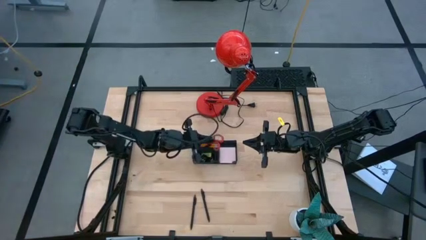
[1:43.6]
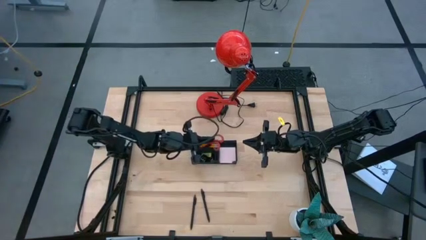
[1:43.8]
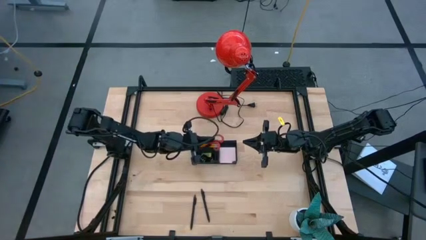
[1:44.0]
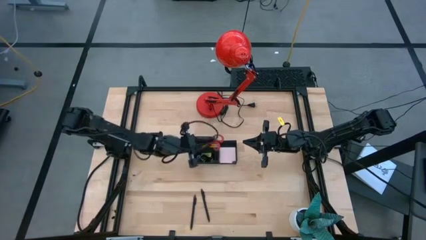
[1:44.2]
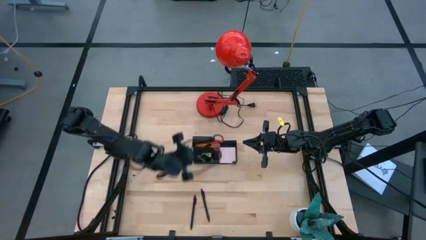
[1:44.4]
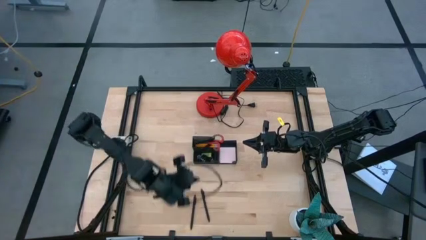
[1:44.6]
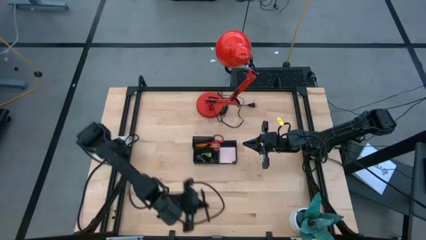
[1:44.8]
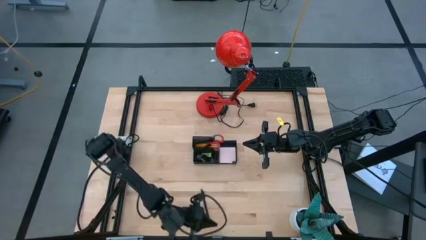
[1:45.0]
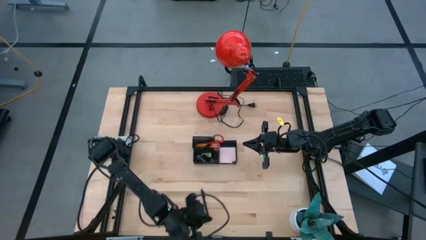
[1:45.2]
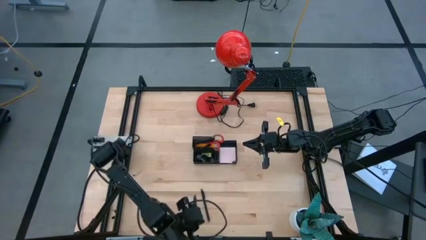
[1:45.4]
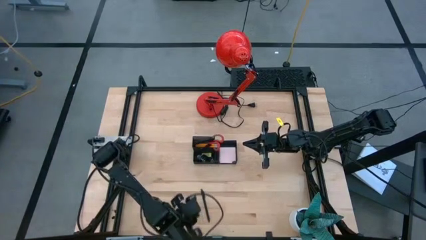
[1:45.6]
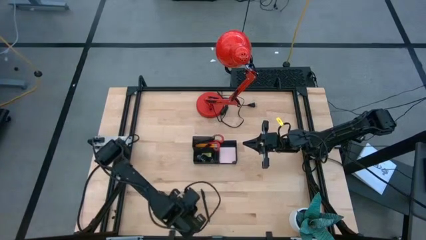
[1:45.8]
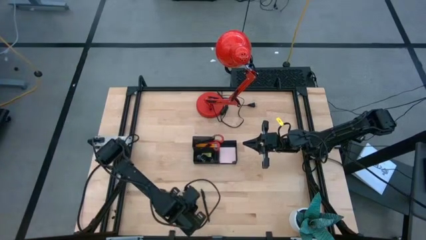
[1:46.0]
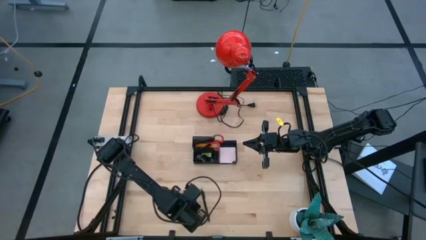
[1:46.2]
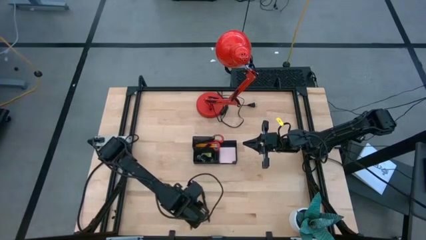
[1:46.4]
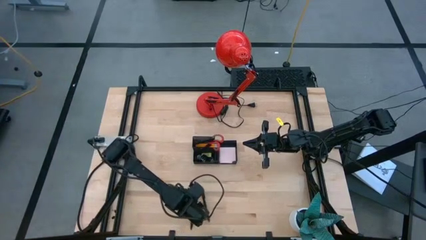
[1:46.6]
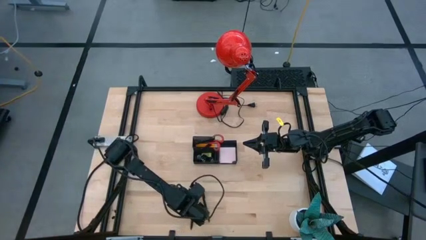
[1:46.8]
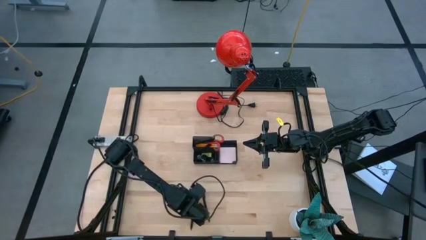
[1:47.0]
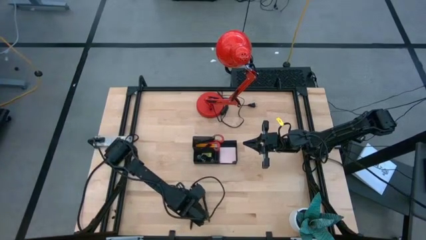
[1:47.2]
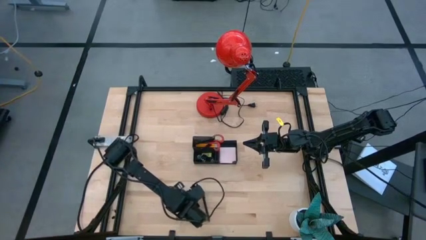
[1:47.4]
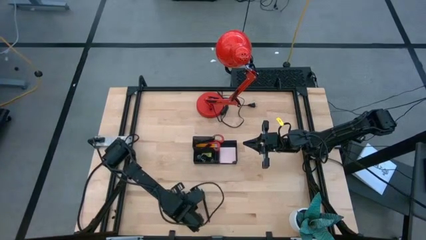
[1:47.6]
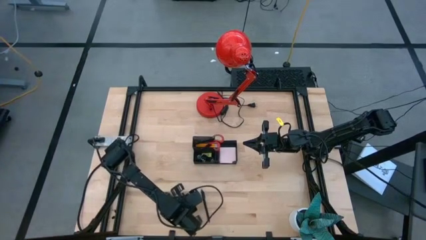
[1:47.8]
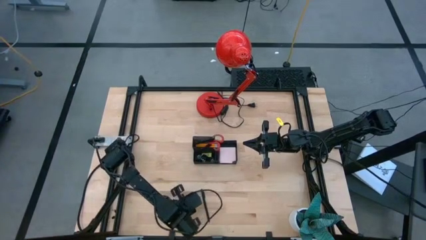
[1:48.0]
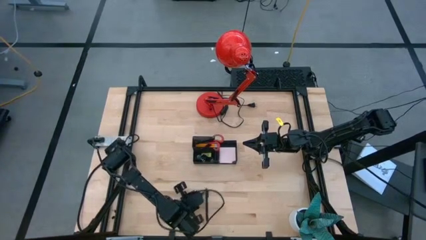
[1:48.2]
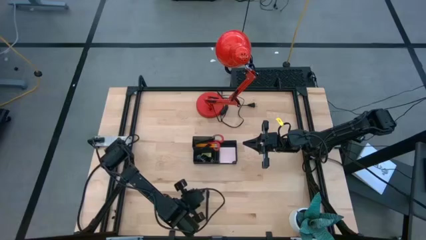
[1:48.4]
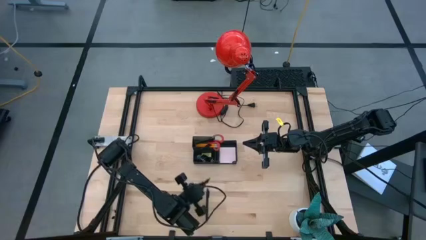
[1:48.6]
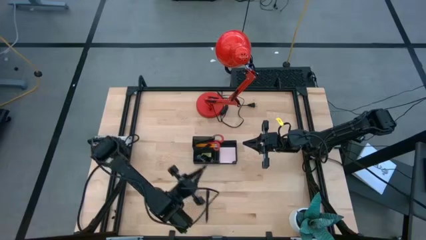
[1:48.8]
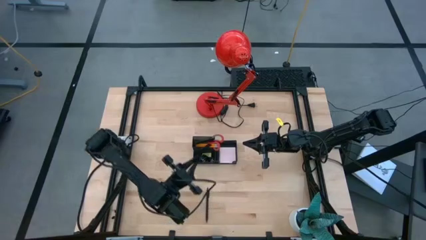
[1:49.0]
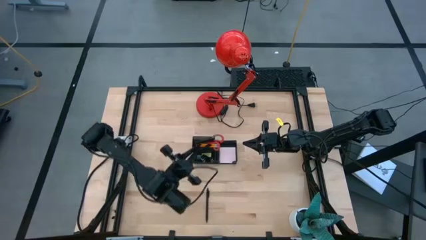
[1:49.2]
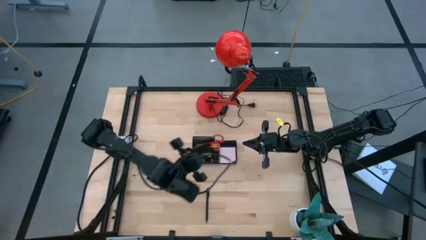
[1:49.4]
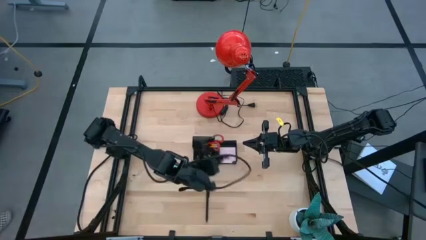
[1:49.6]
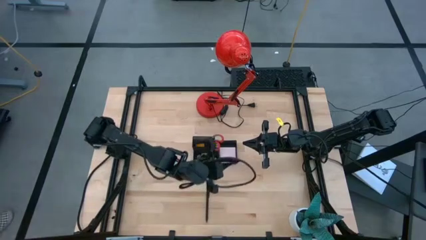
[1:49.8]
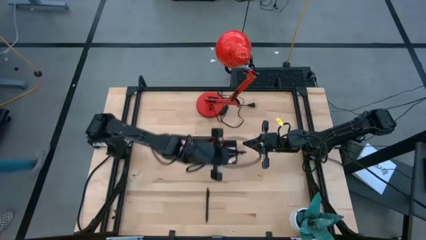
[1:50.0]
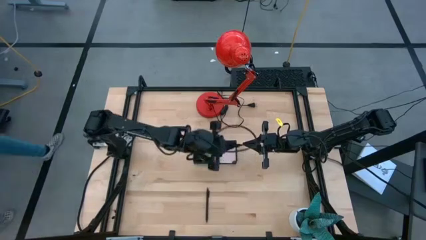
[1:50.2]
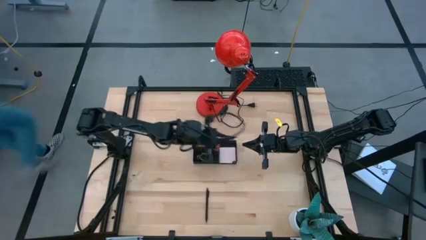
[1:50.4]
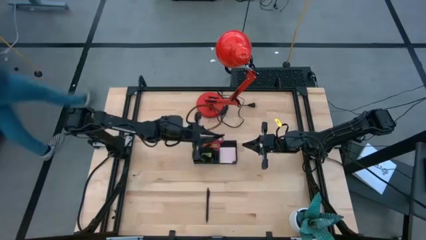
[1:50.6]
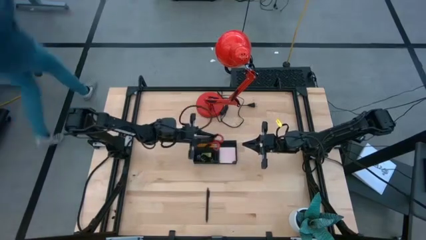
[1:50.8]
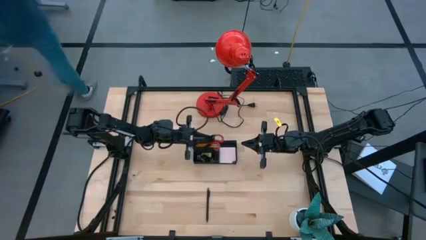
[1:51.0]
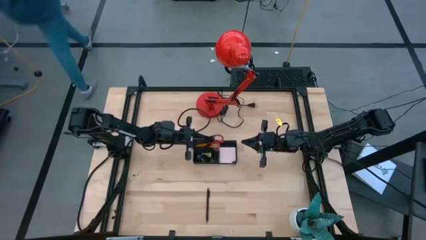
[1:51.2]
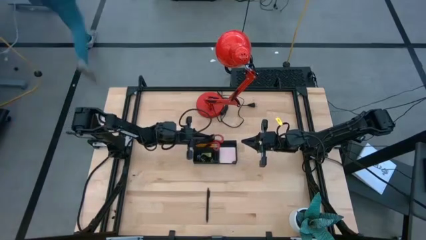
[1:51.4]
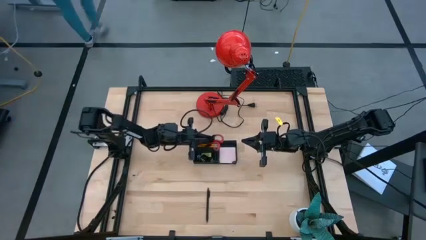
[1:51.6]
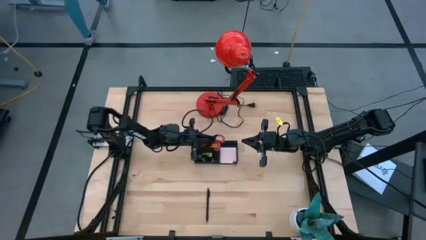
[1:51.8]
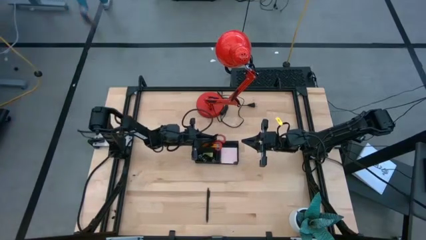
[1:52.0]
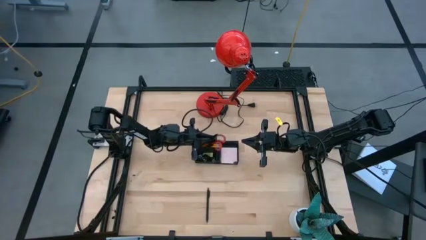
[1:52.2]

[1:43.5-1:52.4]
Task: Pick and place office supplies into organizer
Put the black pen into the black mesh desk organizer

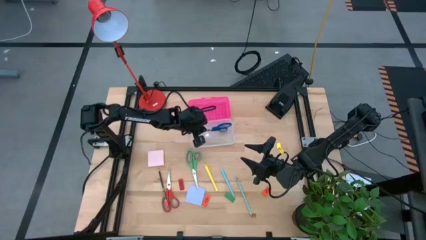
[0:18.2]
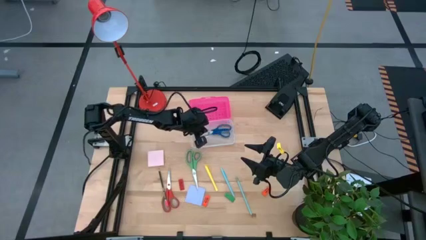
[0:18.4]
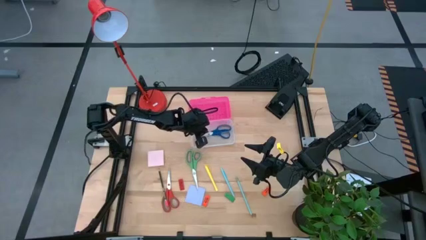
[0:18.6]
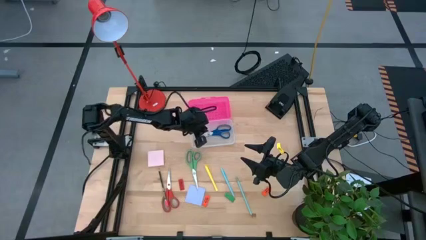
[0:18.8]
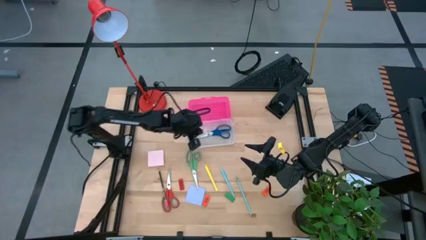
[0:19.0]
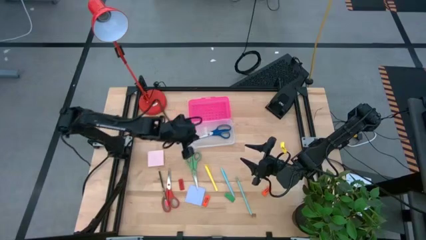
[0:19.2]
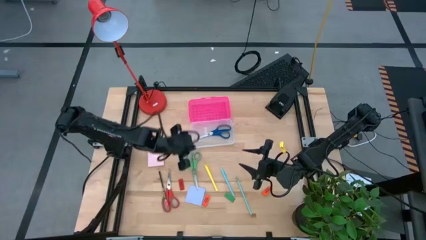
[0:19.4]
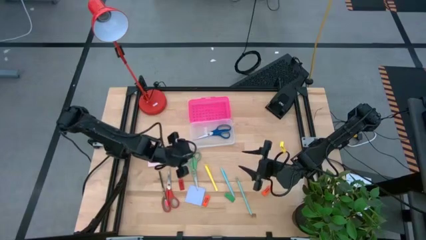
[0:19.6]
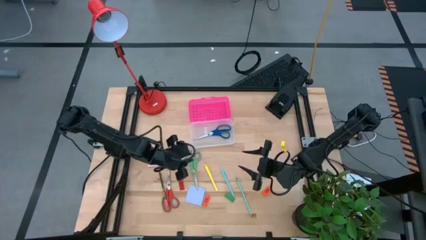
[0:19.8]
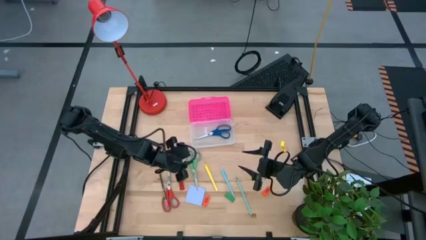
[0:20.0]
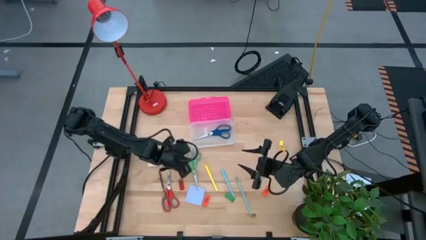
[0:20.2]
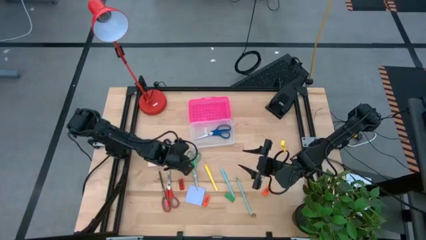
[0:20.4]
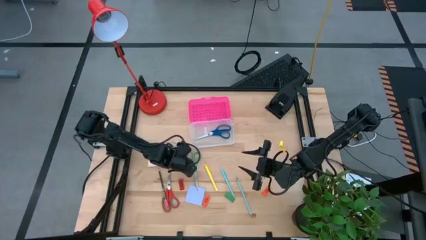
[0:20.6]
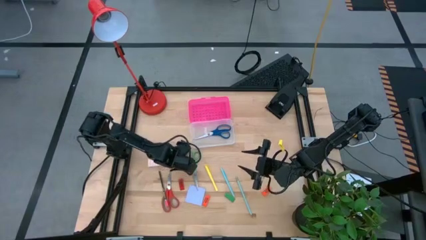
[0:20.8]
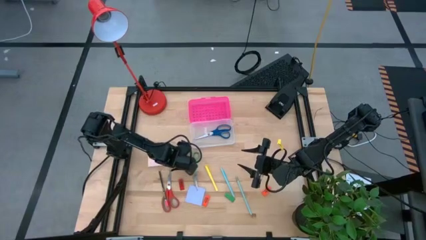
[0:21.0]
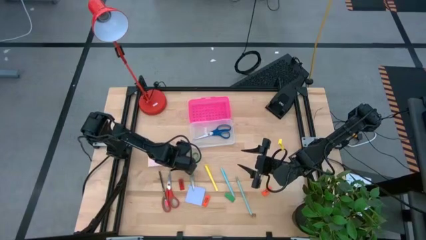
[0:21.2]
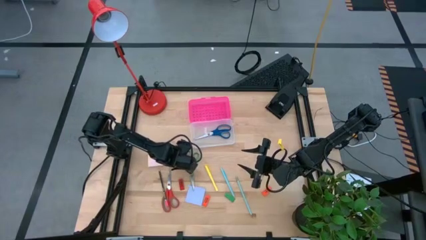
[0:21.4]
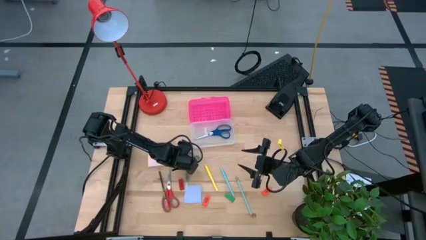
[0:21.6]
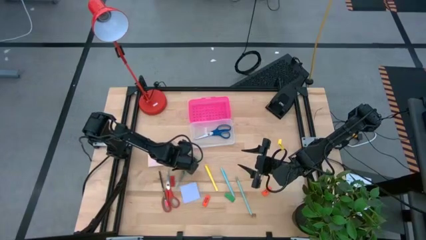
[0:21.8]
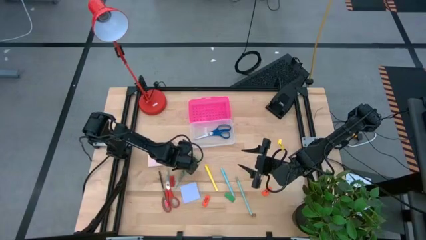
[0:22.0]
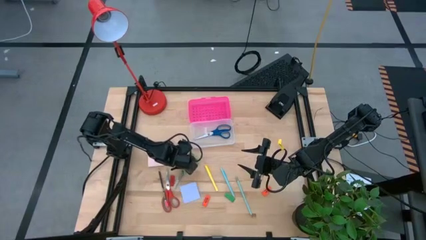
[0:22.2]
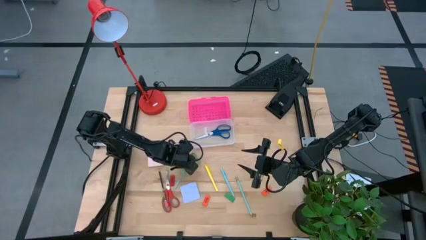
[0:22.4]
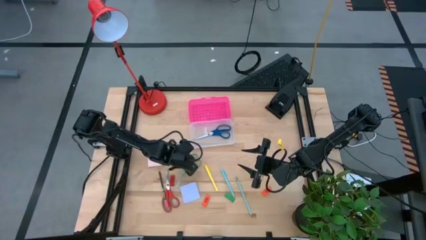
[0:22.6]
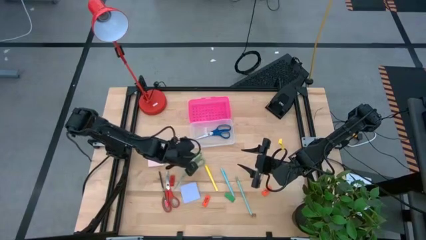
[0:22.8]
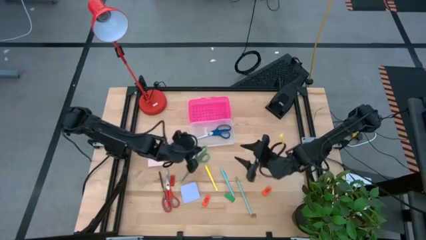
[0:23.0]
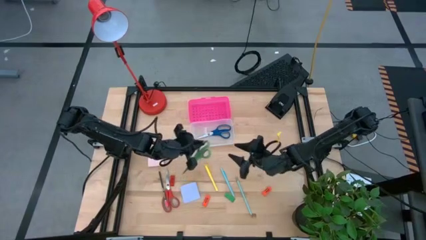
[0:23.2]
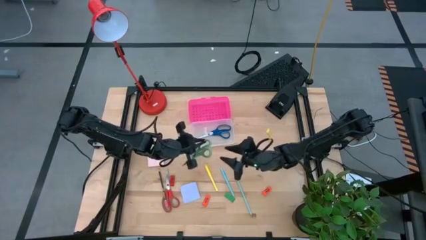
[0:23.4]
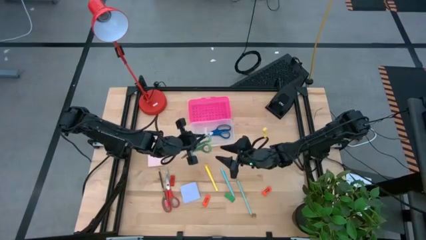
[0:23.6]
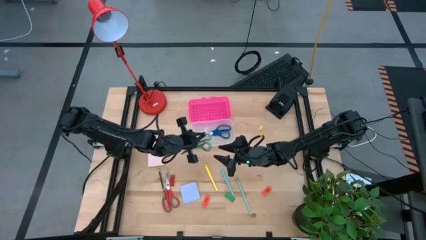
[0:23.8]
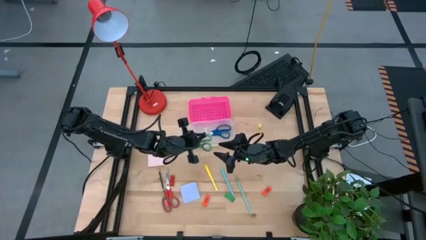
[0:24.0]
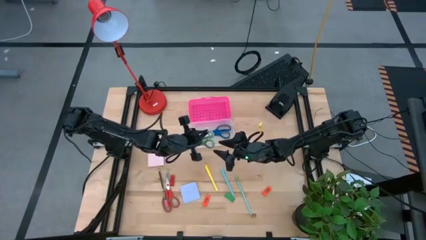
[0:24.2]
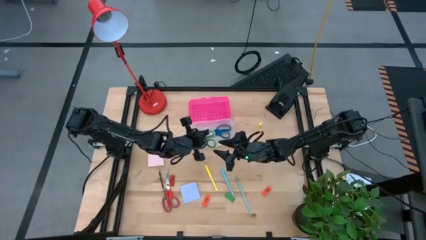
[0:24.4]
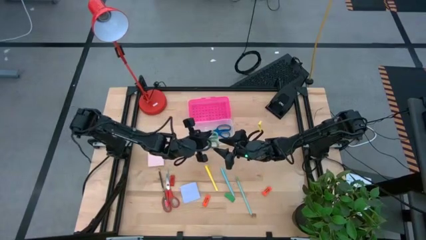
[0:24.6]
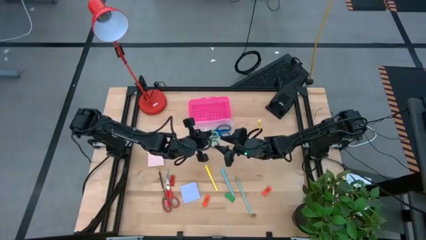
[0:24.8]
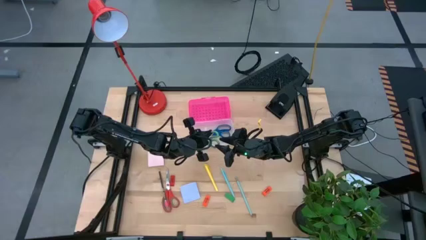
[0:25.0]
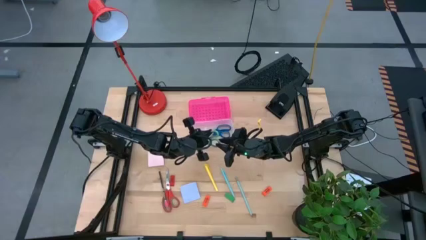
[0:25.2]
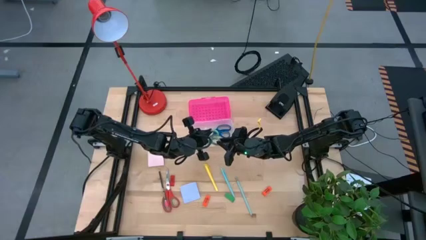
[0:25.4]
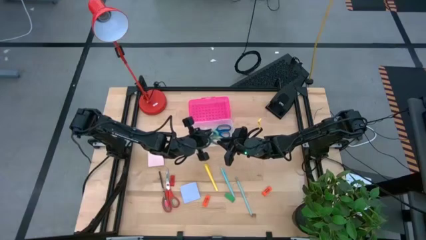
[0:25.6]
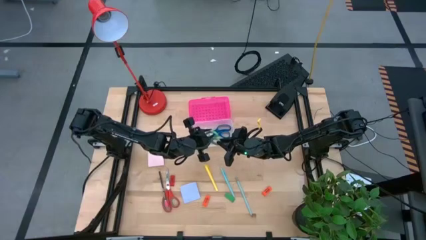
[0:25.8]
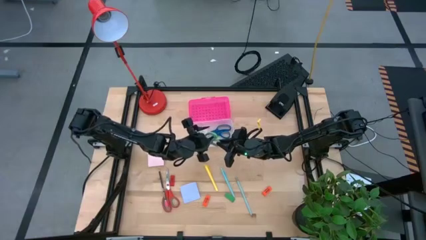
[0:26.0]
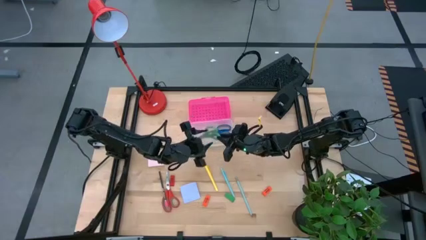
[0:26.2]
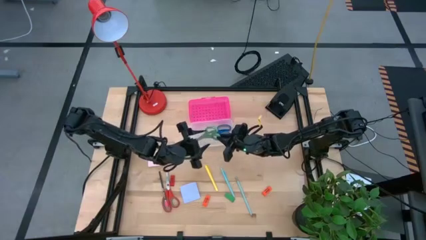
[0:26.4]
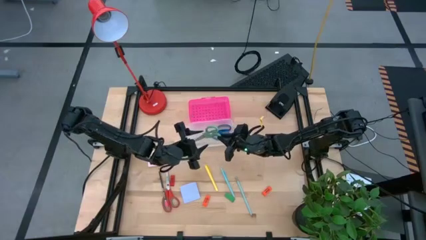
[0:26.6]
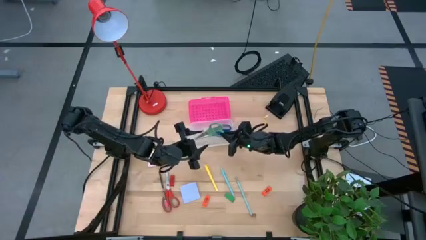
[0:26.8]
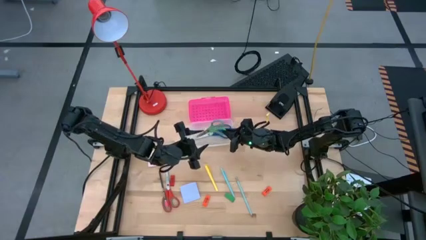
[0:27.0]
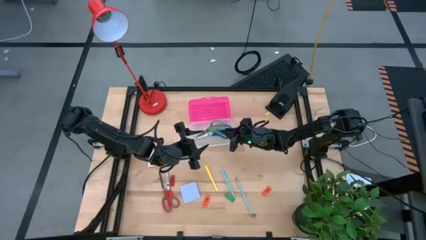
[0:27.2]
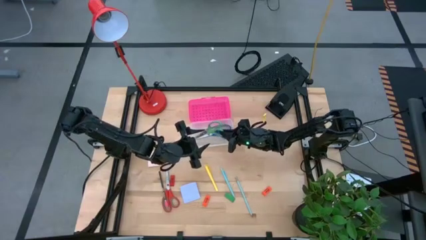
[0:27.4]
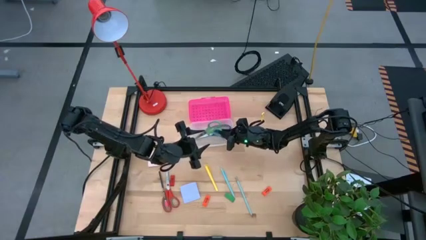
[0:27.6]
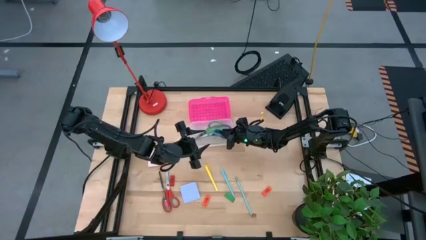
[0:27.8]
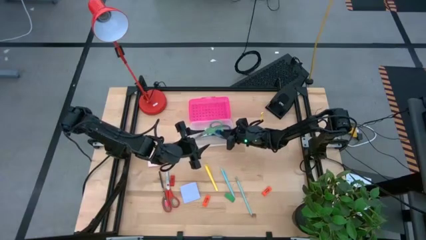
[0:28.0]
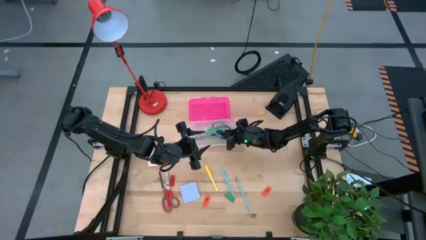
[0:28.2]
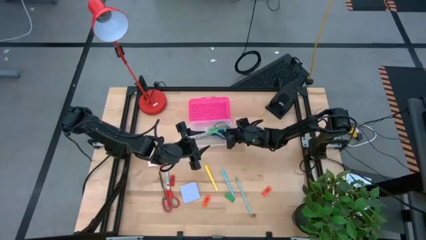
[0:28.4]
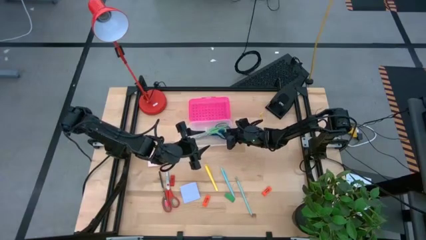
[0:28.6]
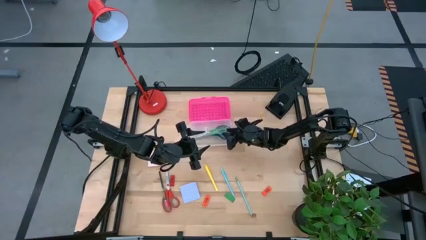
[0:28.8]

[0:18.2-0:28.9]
Task: Pack school essentials
Put the green scissors into the pink supply box
